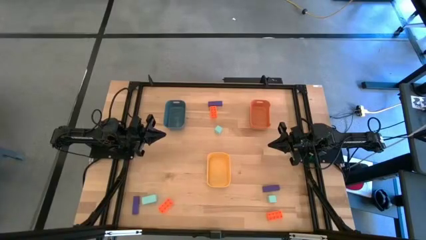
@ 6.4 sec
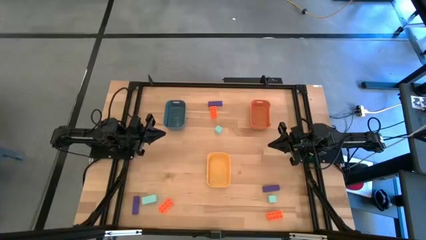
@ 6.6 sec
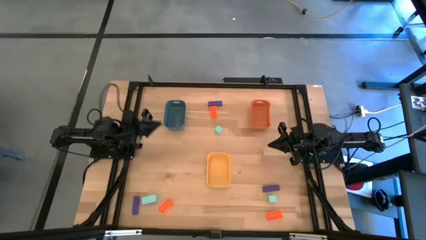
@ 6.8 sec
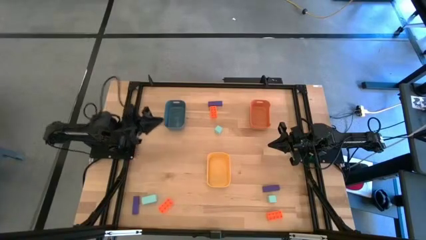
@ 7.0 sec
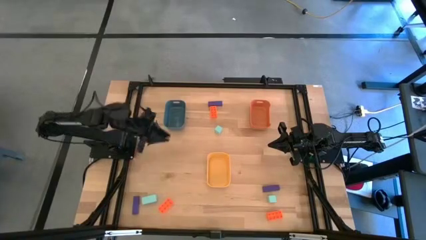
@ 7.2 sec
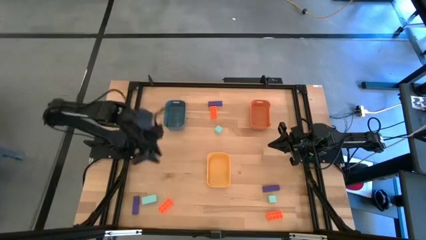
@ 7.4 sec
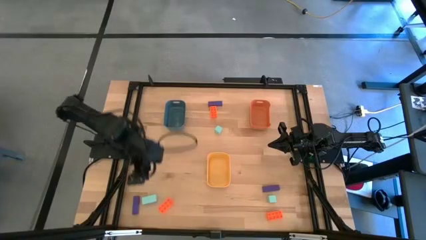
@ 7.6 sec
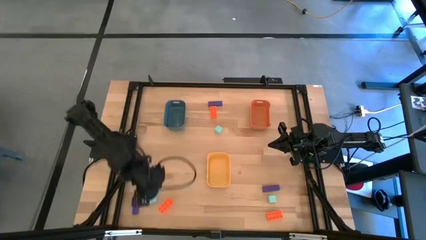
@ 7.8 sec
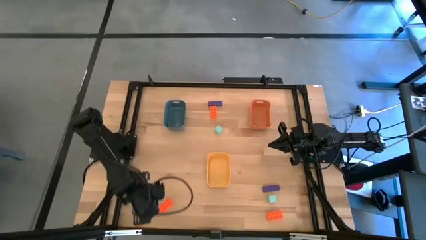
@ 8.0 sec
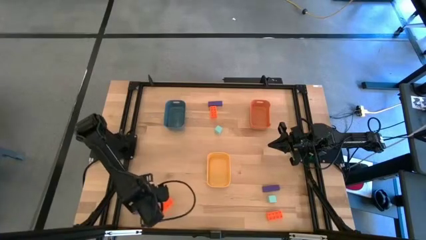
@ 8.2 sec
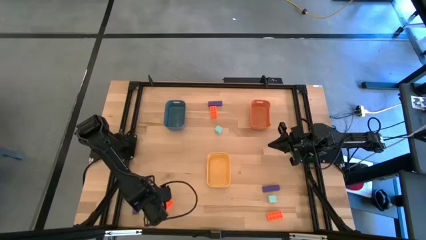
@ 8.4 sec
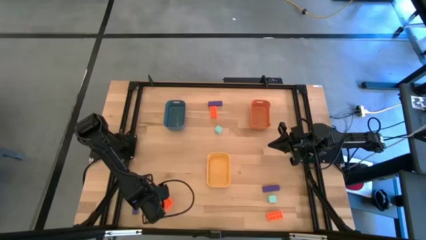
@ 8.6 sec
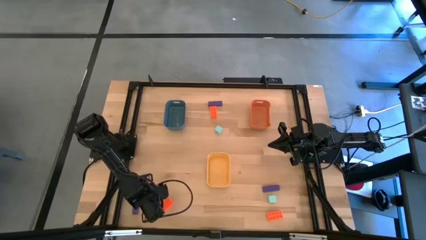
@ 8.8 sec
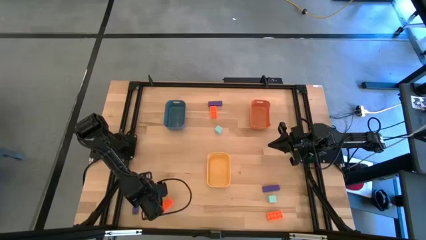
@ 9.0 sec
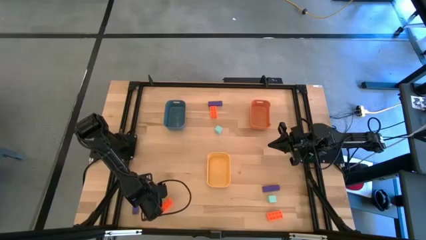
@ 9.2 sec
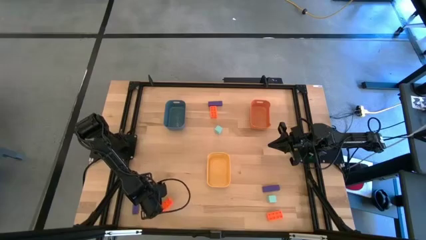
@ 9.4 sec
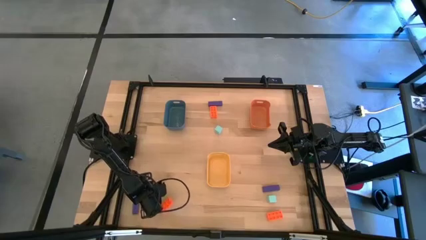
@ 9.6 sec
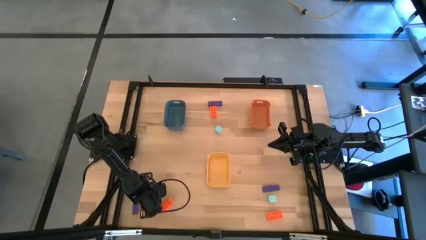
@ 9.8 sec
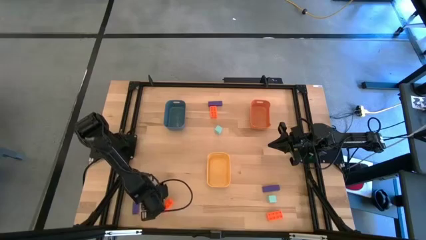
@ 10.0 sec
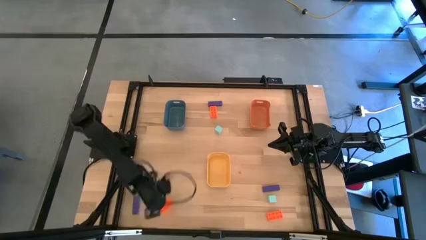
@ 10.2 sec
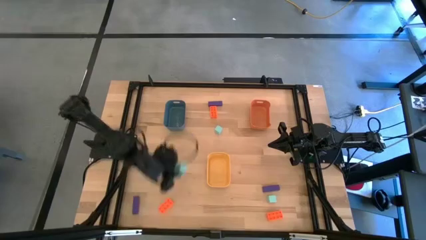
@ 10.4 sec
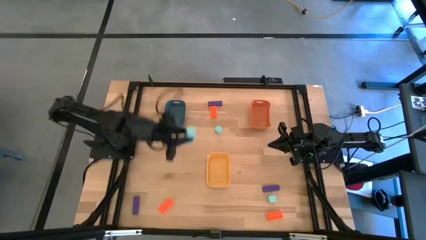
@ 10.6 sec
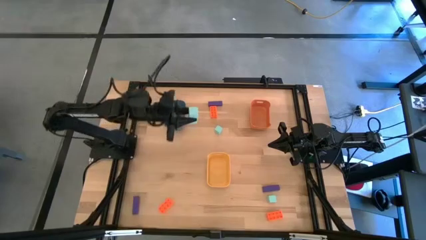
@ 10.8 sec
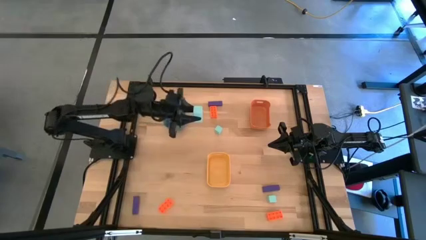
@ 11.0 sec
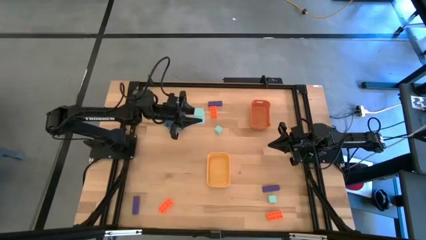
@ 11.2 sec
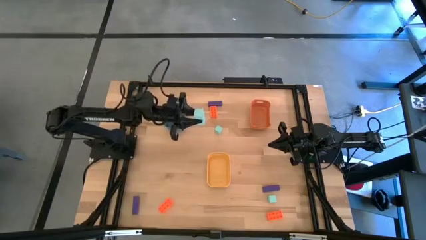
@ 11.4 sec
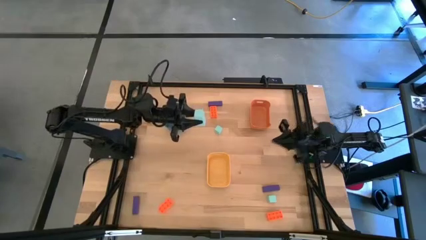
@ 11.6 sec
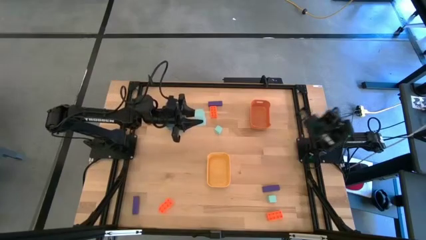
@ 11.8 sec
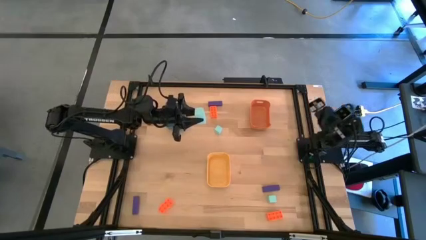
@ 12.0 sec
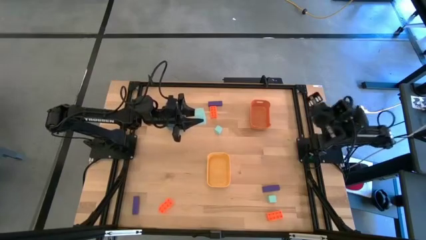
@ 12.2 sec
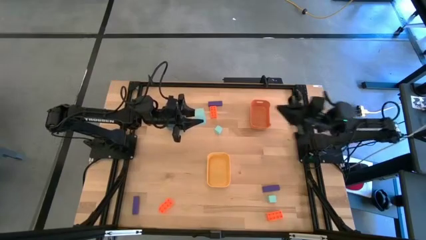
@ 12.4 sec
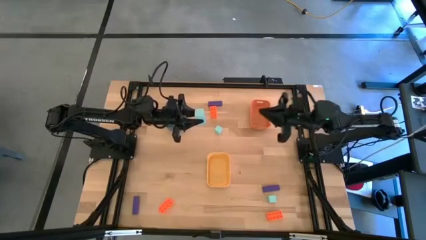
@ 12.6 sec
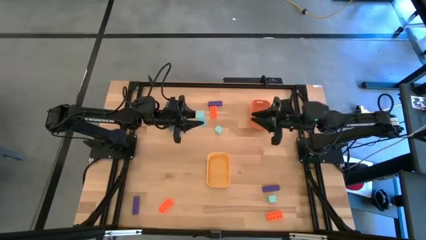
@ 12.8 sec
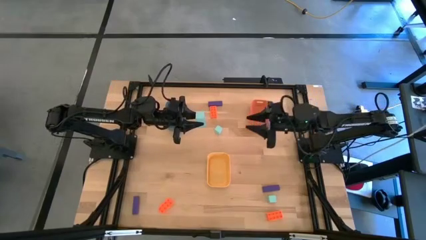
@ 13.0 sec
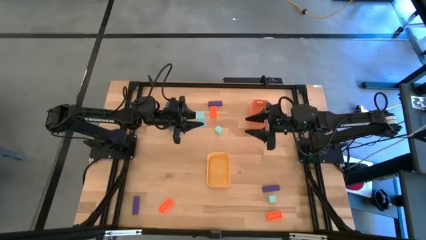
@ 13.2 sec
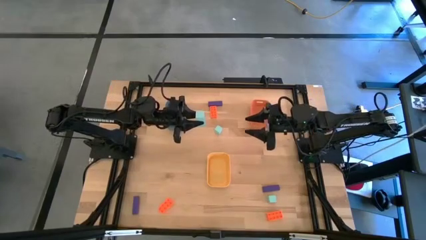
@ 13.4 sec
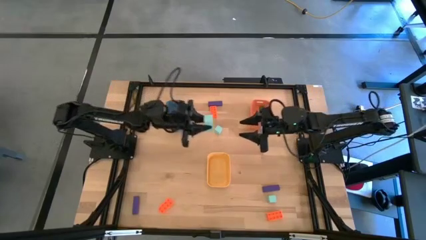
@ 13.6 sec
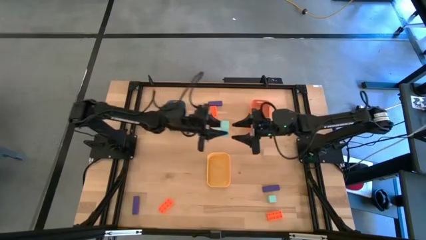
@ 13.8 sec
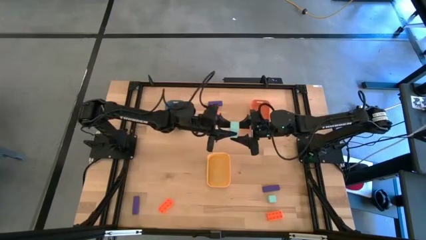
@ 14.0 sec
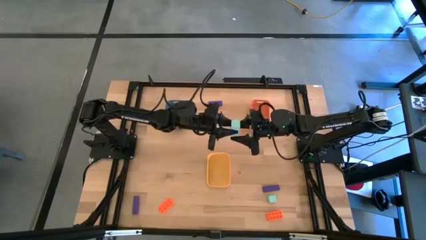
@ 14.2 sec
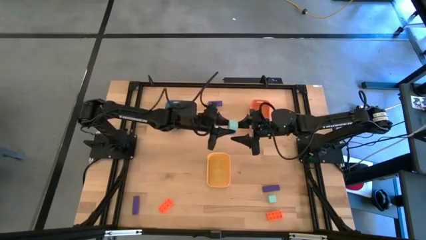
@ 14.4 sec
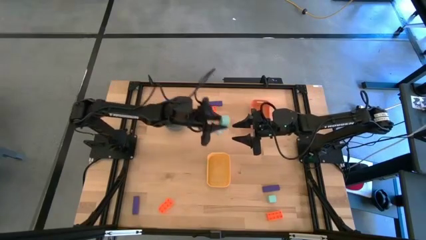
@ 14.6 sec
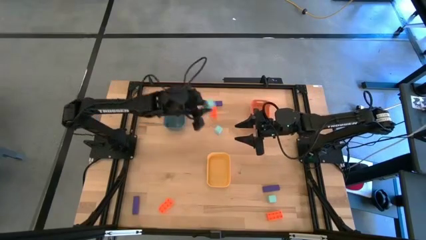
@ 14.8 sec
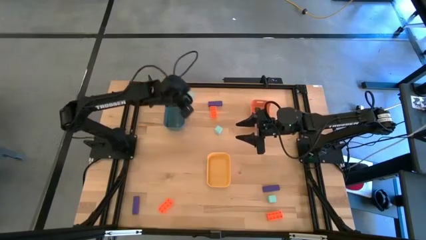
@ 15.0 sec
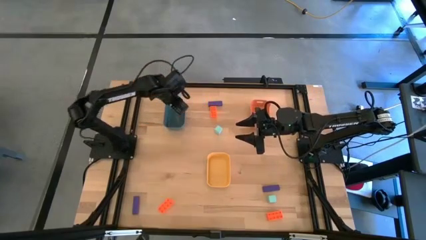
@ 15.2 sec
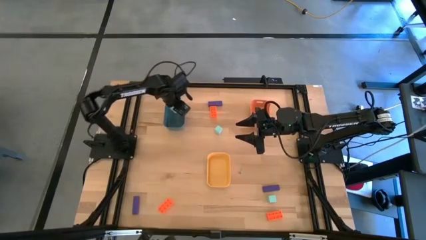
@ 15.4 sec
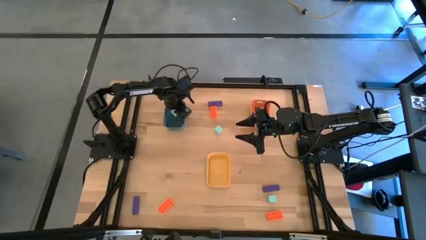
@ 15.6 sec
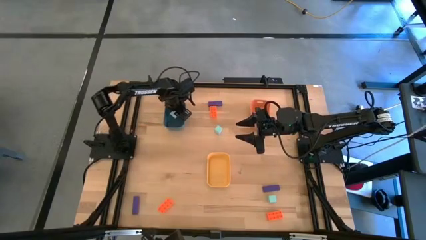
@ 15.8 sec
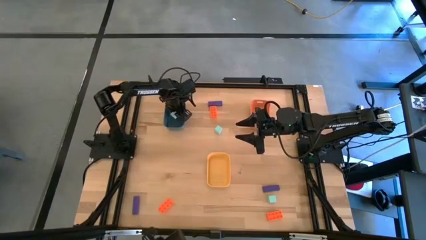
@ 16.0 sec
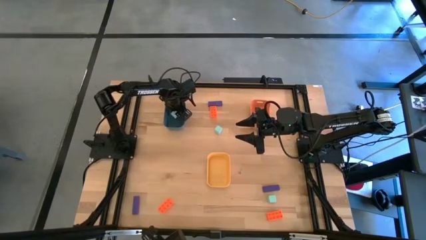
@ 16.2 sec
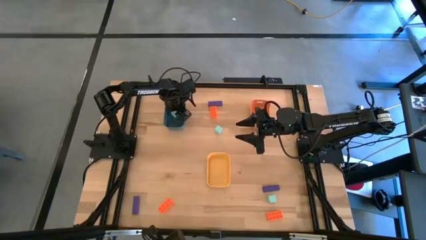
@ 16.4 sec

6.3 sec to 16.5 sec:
Task: Sort & place blocks by color
Put the bottom left light blue block into the blue bin
